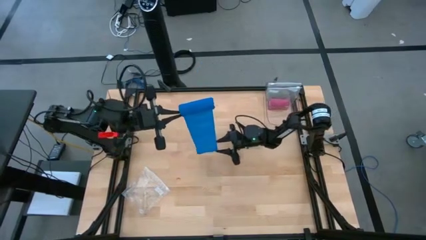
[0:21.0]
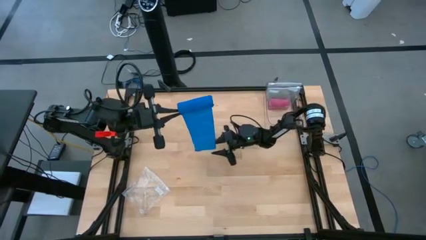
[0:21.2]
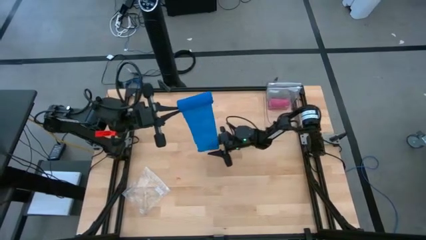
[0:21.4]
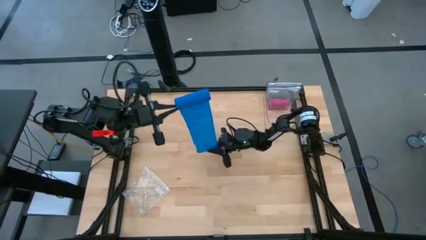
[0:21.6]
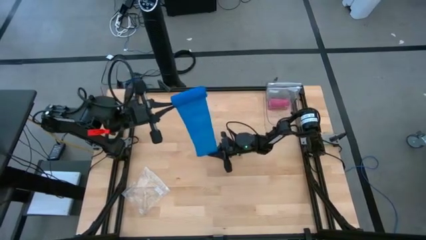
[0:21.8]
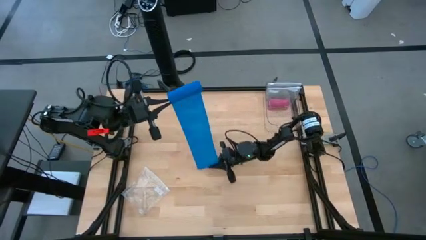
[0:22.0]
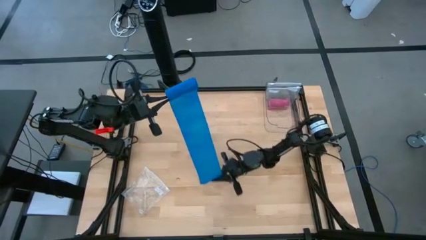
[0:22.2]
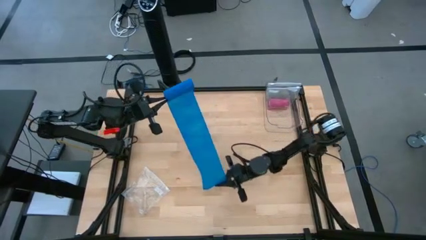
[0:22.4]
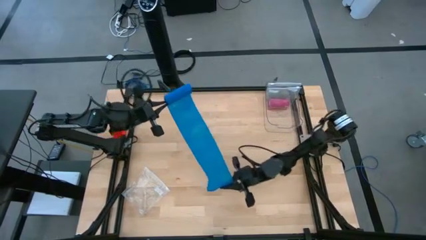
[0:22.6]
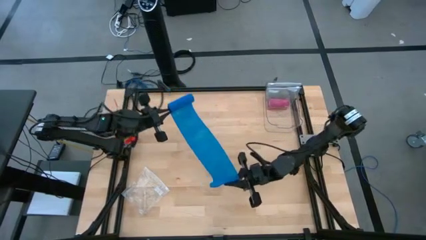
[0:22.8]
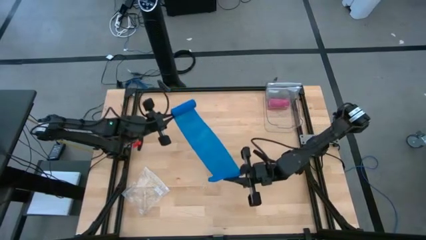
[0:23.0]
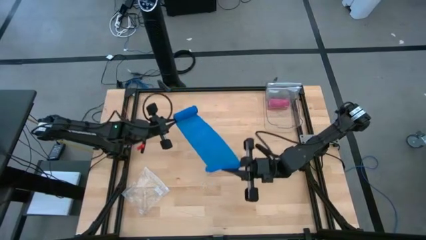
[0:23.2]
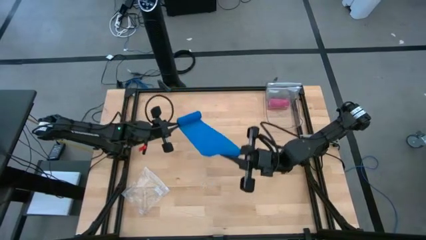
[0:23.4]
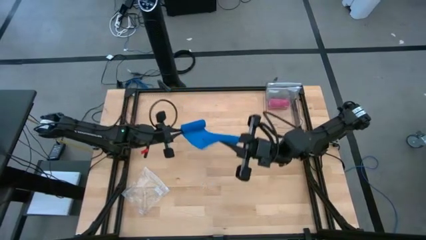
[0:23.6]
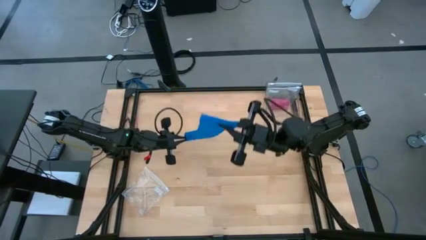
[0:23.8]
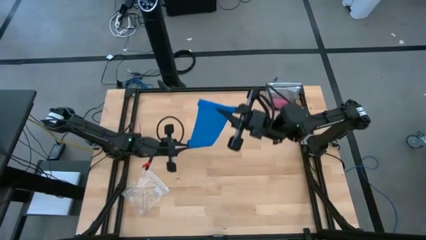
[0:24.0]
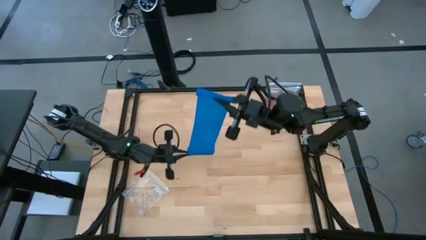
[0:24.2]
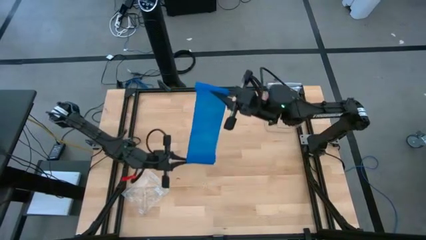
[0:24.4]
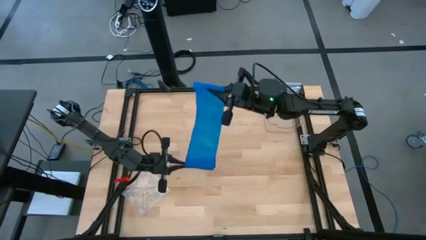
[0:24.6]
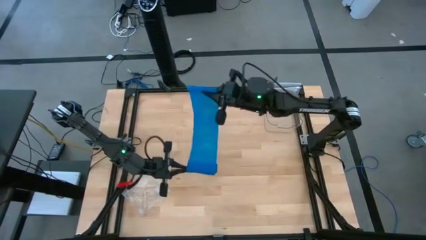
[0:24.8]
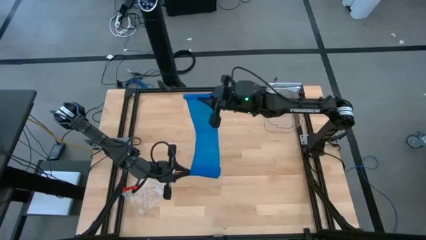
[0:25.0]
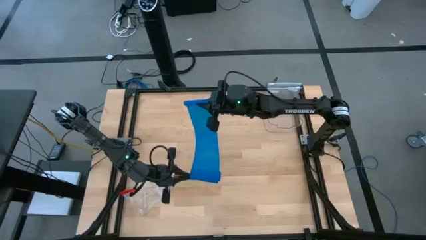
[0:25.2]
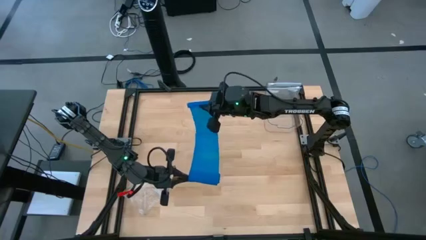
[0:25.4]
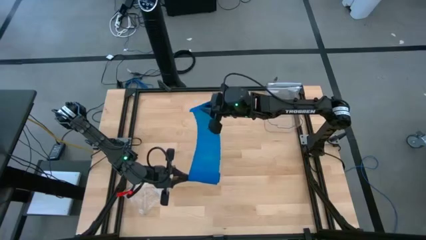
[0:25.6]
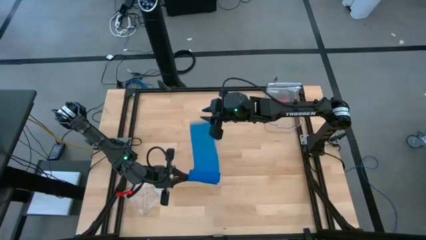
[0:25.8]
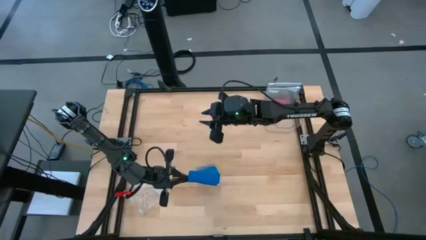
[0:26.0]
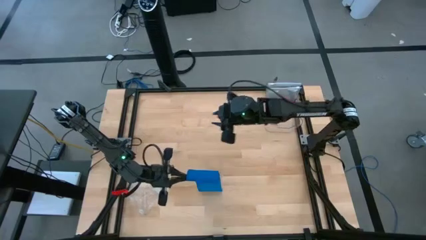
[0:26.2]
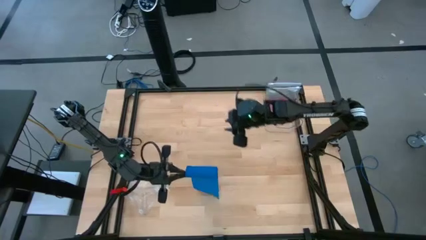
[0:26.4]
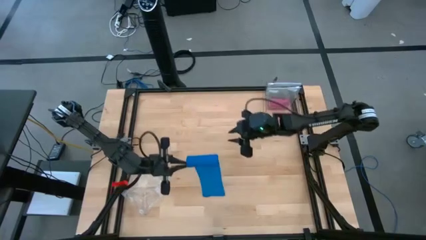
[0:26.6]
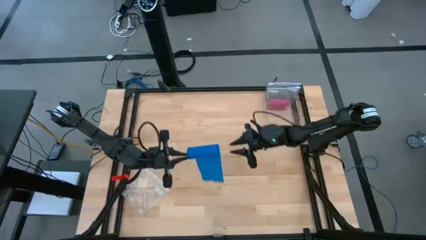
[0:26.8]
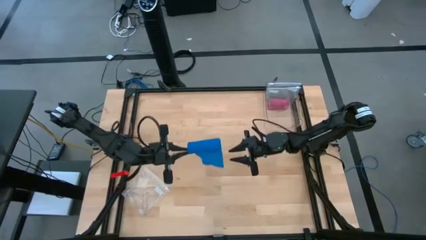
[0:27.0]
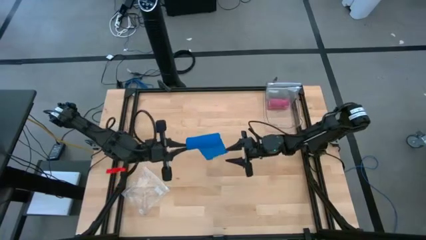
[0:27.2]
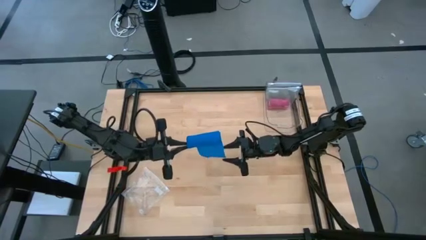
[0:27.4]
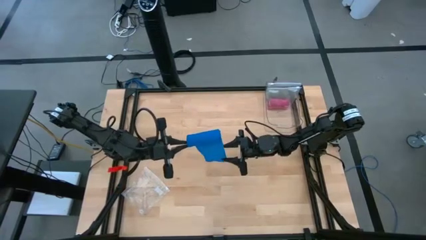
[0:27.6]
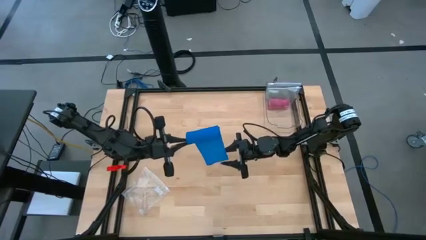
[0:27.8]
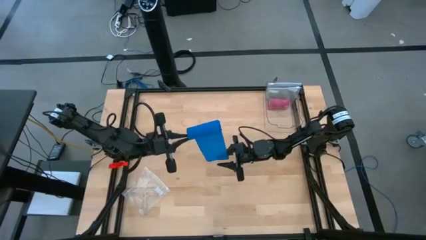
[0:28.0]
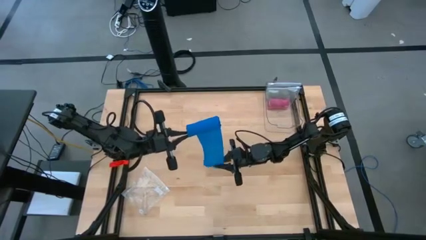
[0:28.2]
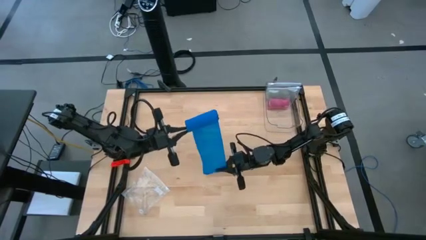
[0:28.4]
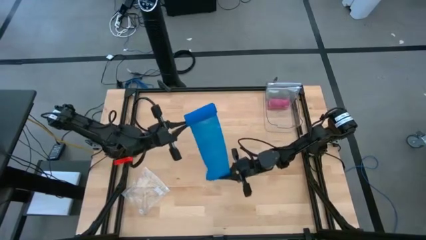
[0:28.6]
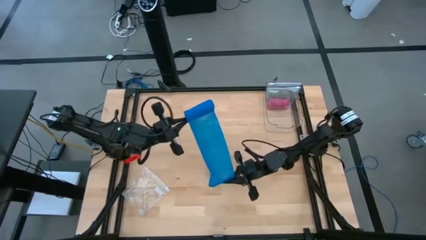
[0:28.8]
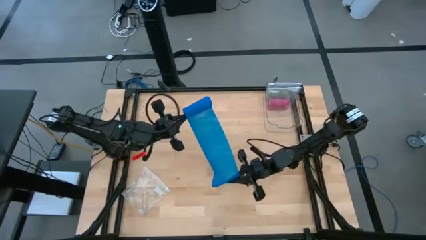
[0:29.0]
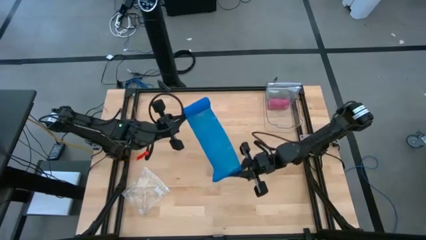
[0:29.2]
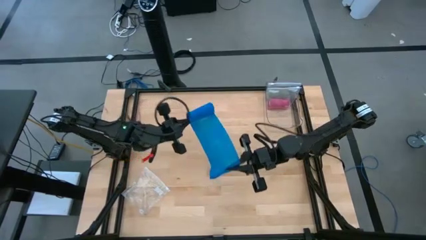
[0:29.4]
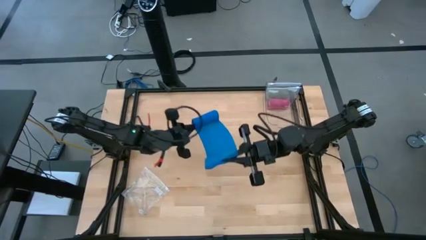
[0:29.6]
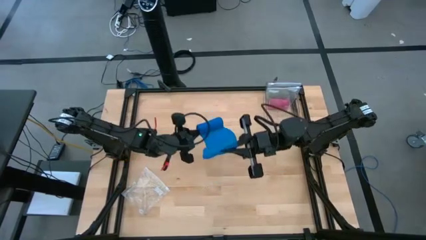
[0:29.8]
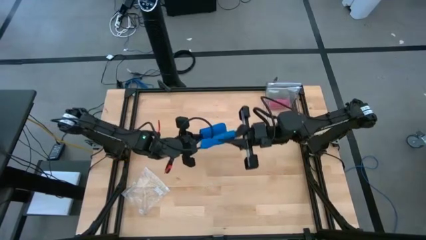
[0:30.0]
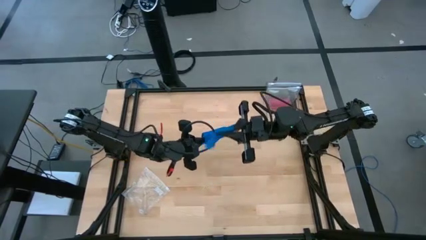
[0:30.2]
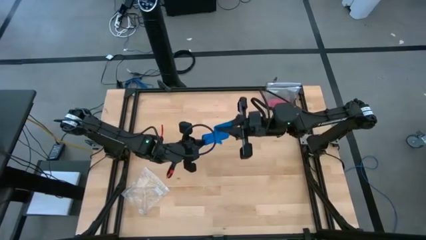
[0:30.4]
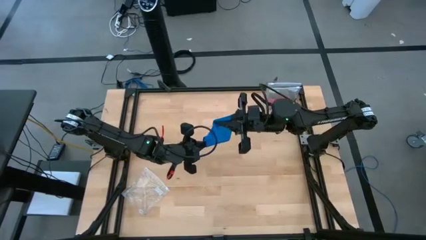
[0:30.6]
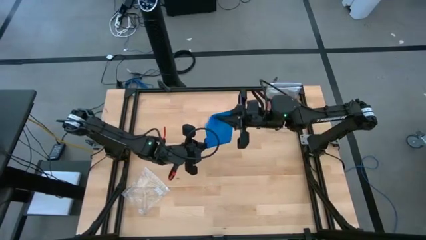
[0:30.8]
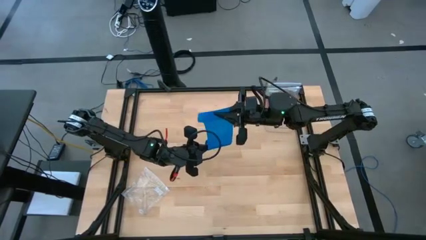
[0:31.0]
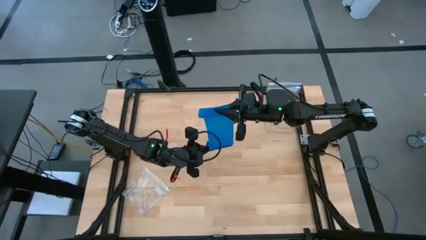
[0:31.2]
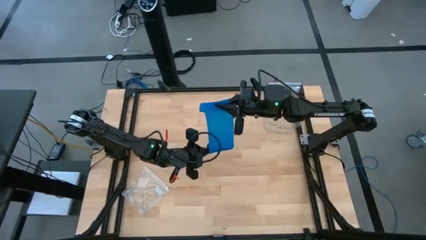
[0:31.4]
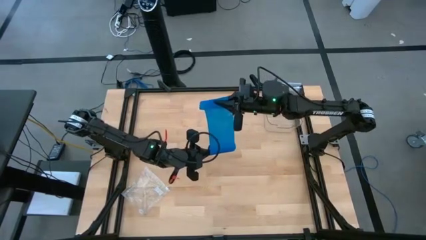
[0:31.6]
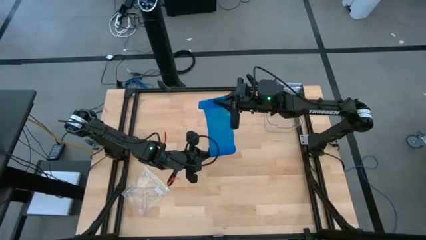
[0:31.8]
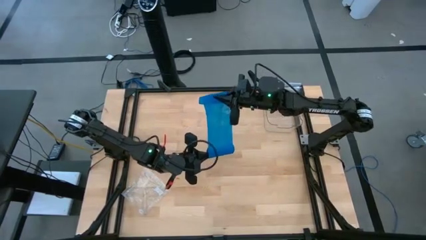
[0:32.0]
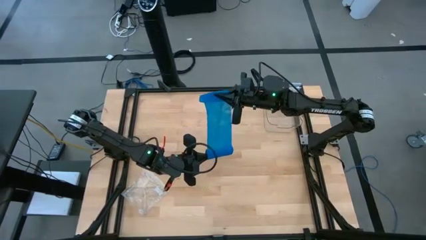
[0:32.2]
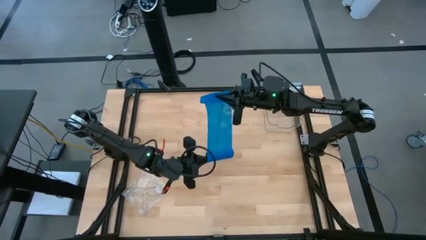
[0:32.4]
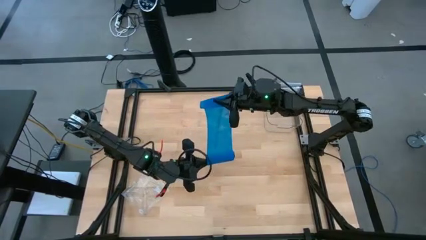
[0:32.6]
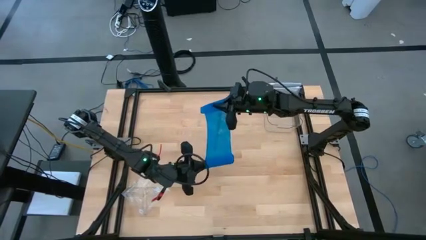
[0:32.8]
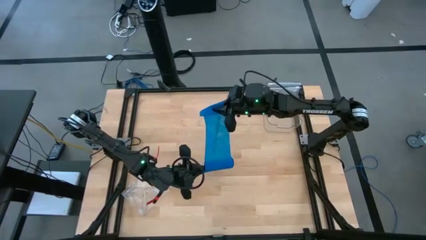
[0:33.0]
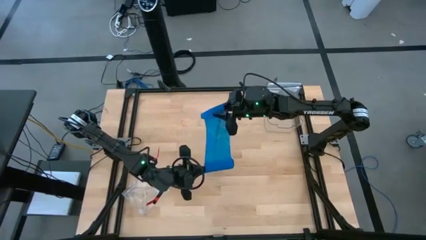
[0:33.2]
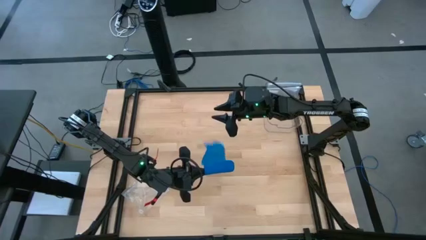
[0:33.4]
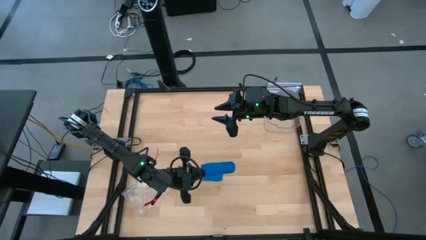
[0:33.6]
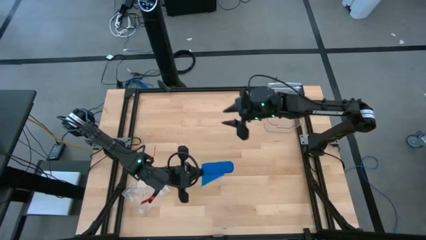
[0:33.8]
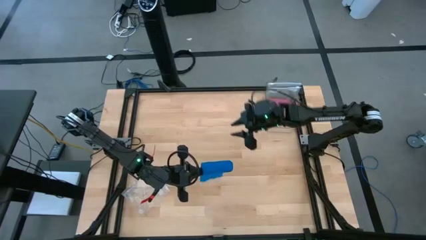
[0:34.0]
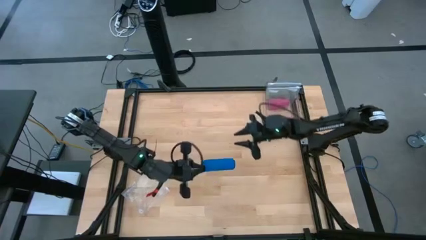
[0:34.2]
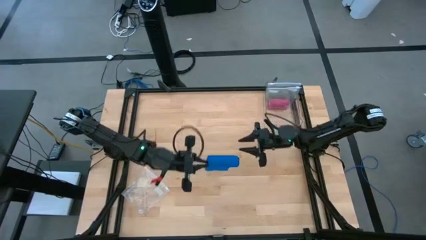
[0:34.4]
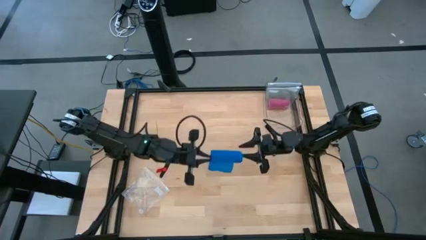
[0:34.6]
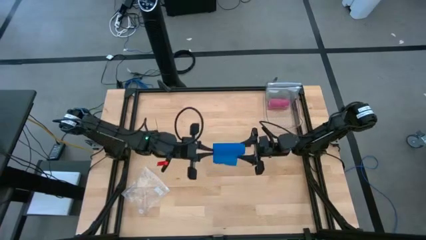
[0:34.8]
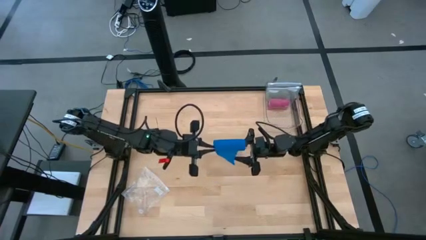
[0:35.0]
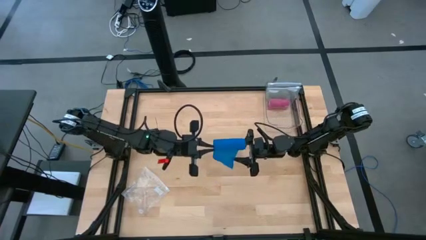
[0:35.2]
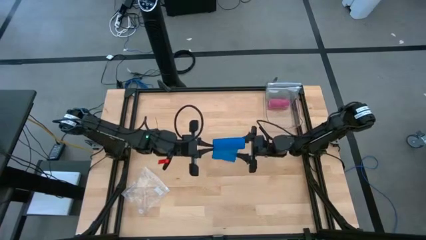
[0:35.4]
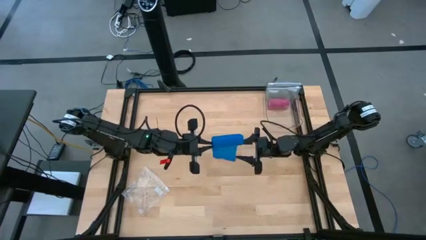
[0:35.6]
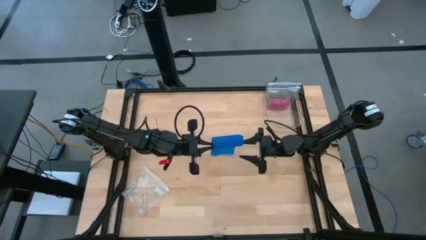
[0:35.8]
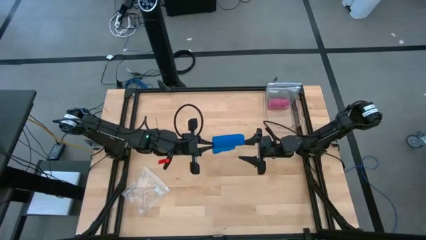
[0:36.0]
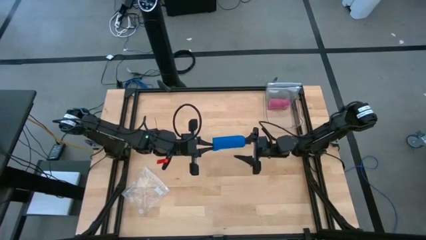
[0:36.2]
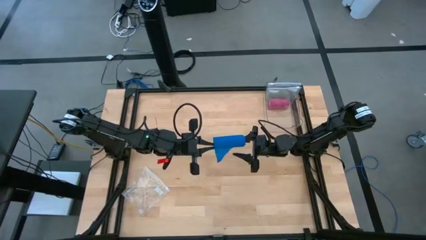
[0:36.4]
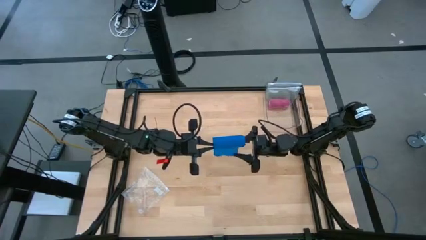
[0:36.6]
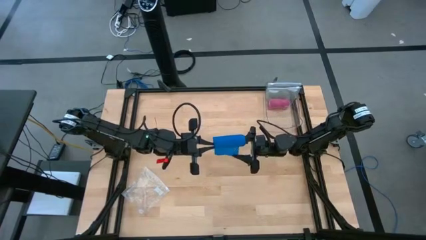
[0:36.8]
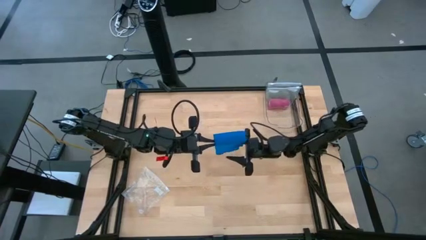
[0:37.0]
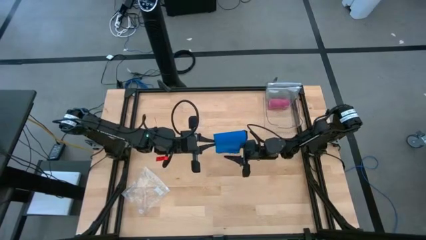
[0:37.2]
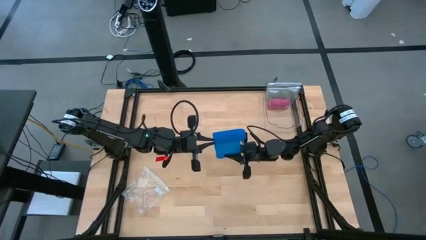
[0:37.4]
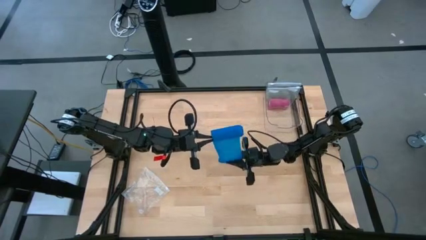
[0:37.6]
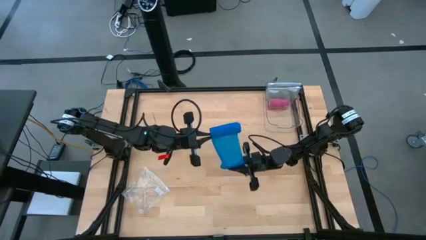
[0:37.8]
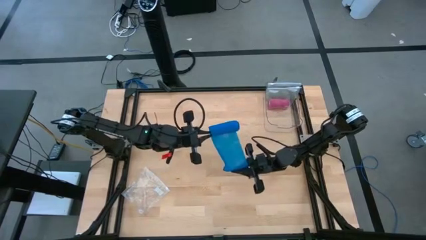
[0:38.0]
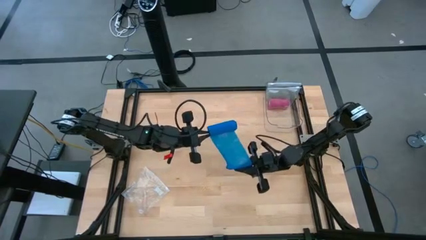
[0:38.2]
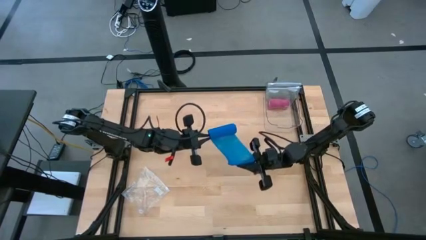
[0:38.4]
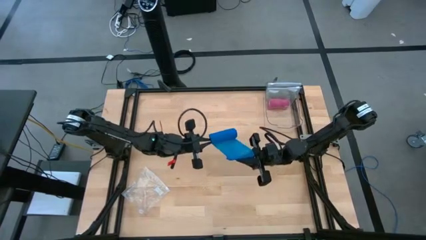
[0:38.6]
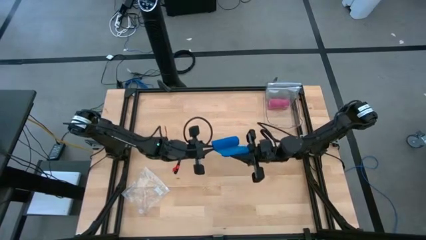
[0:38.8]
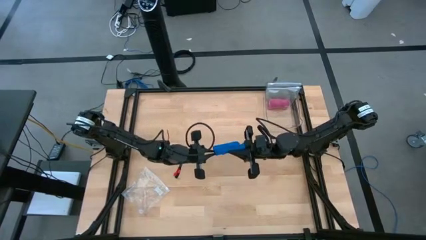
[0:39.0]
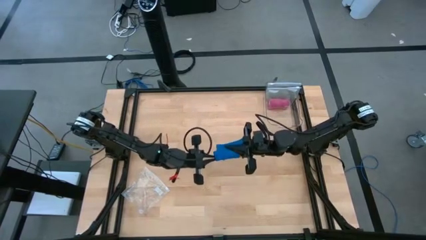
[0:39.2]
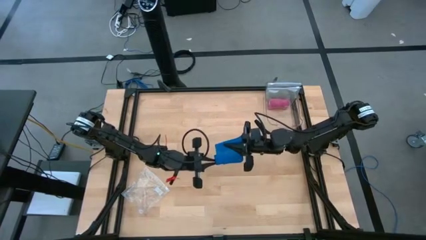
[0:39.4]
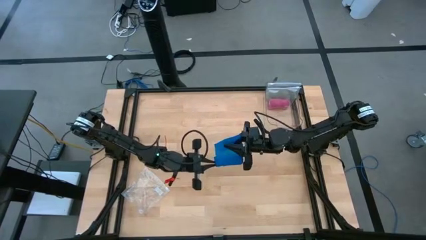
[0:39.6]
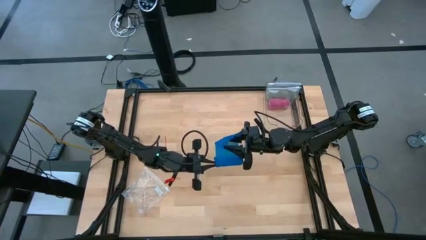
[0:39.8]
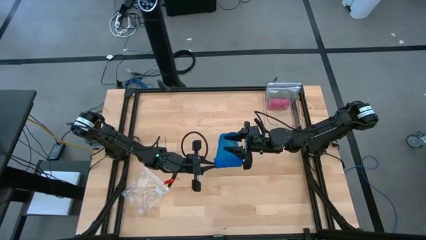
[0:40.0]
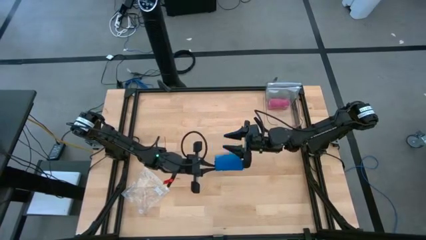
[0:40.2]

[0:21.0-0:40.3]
Task: Roll bandage
Roll the blue bandage
